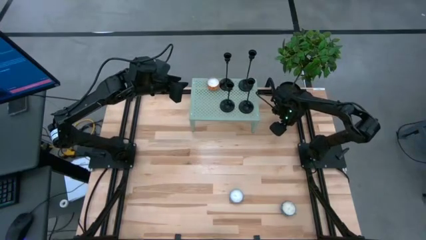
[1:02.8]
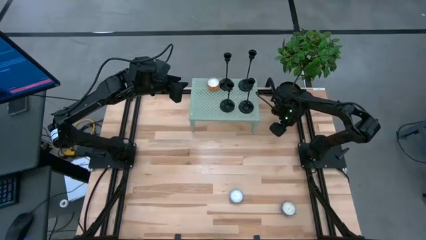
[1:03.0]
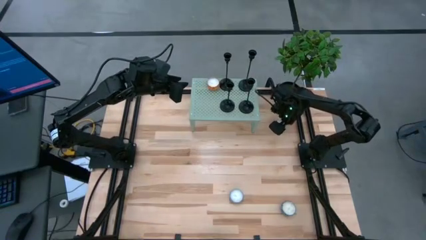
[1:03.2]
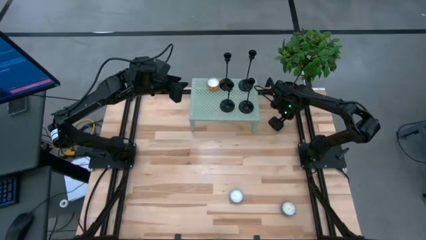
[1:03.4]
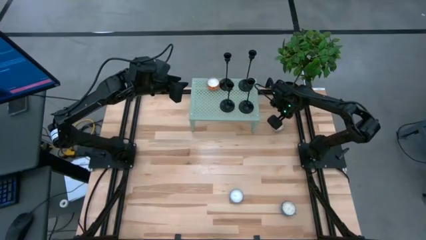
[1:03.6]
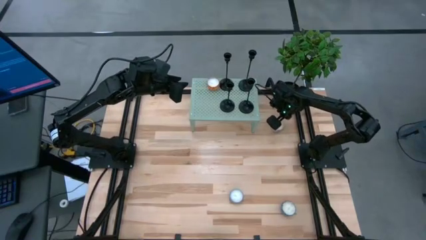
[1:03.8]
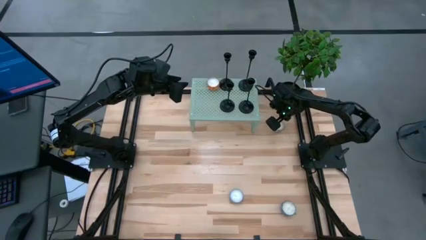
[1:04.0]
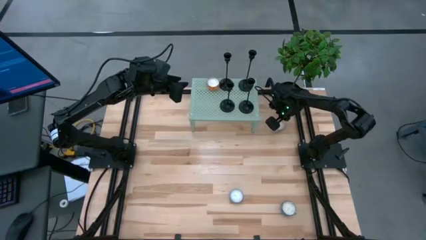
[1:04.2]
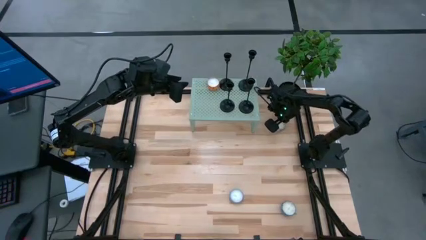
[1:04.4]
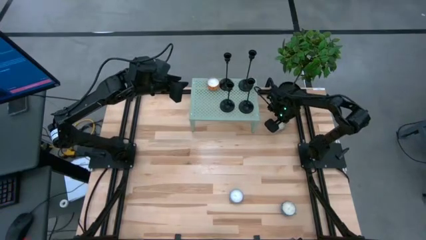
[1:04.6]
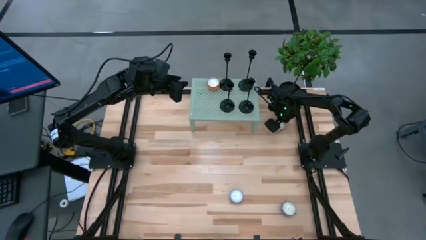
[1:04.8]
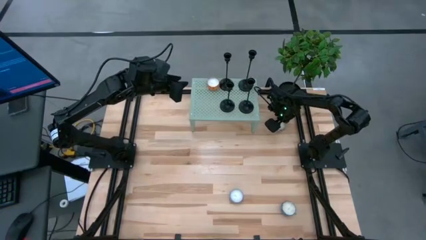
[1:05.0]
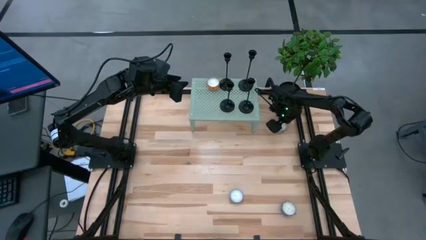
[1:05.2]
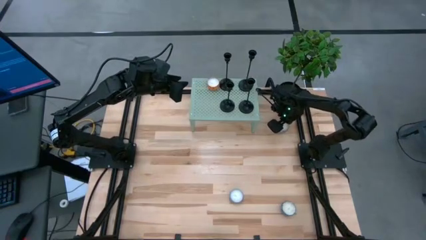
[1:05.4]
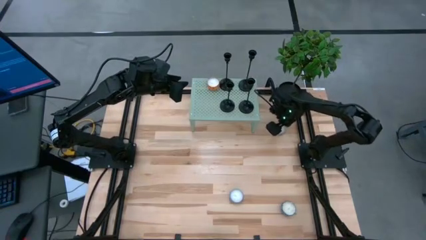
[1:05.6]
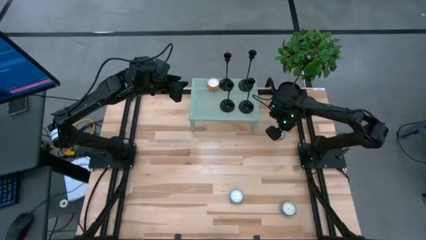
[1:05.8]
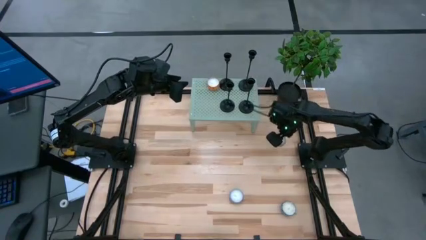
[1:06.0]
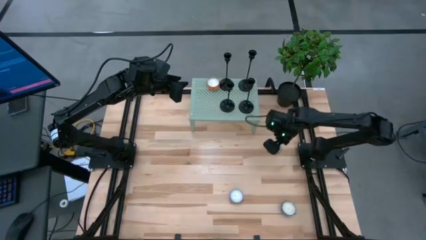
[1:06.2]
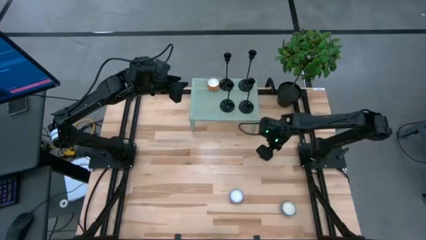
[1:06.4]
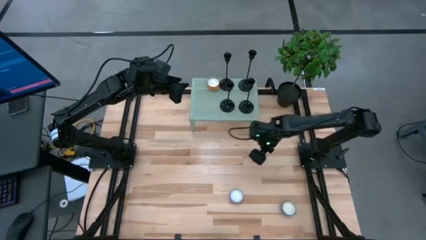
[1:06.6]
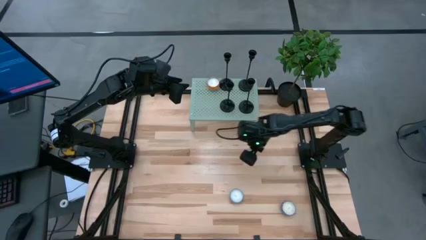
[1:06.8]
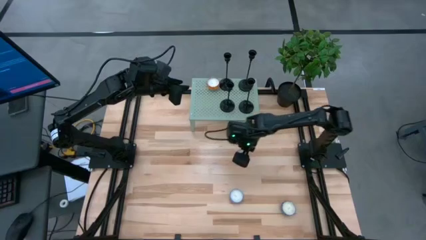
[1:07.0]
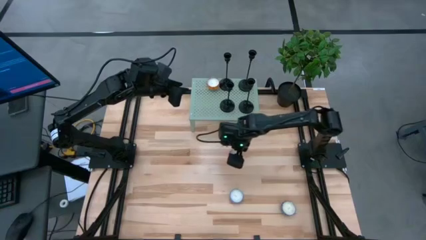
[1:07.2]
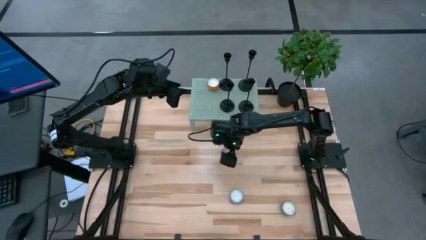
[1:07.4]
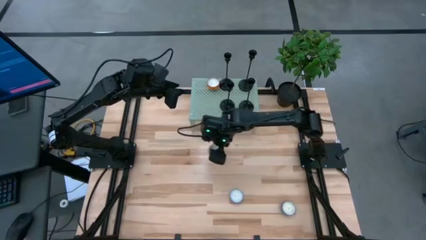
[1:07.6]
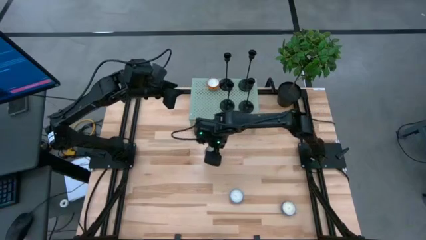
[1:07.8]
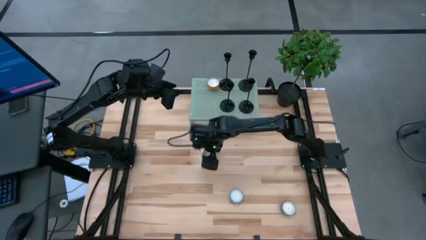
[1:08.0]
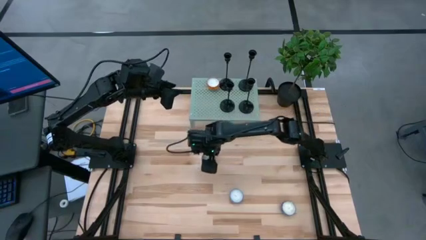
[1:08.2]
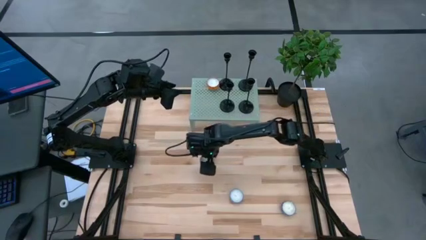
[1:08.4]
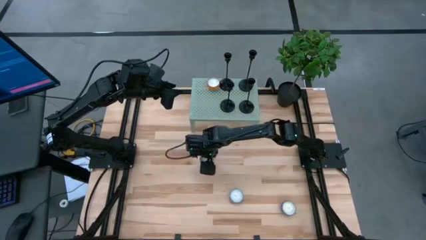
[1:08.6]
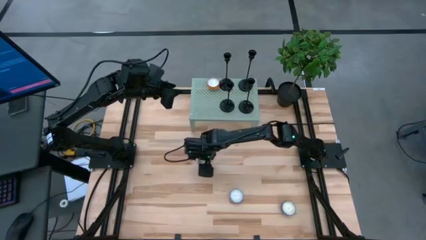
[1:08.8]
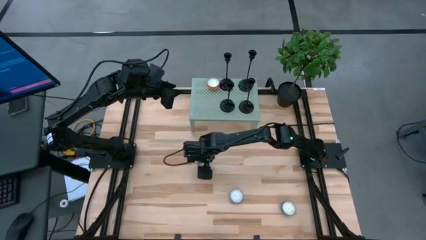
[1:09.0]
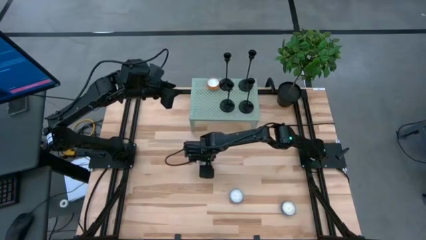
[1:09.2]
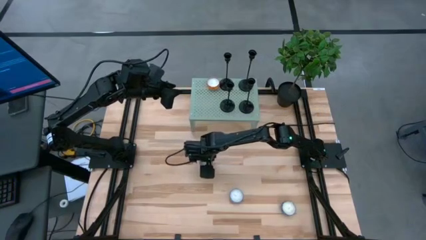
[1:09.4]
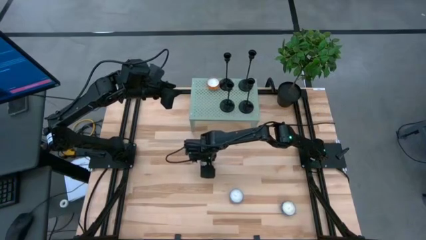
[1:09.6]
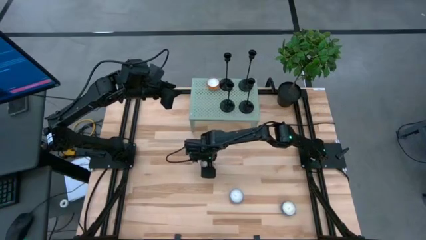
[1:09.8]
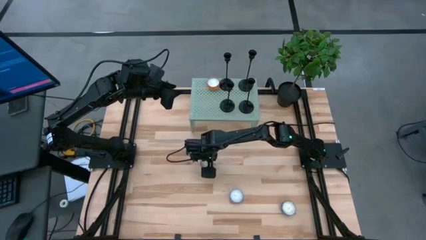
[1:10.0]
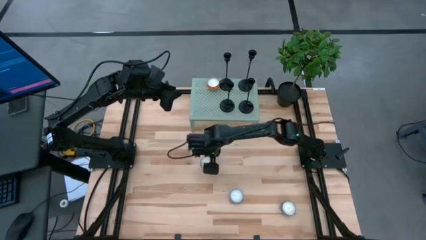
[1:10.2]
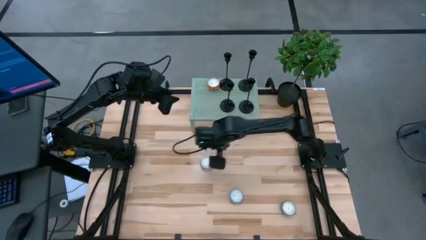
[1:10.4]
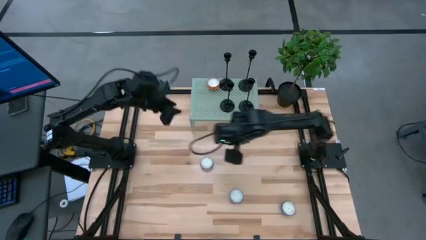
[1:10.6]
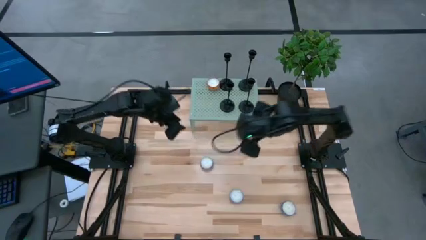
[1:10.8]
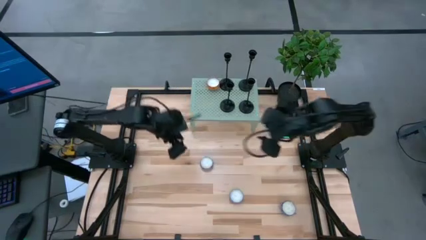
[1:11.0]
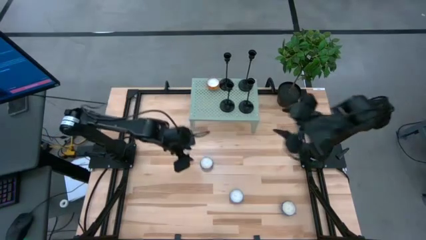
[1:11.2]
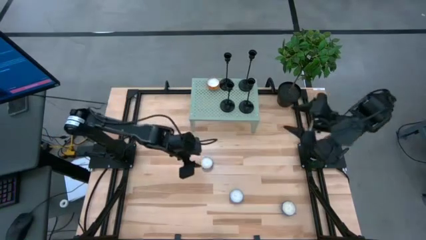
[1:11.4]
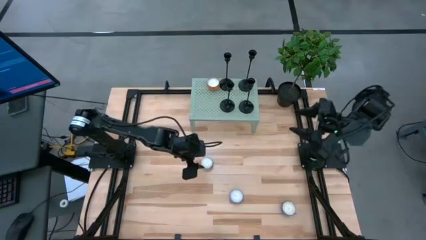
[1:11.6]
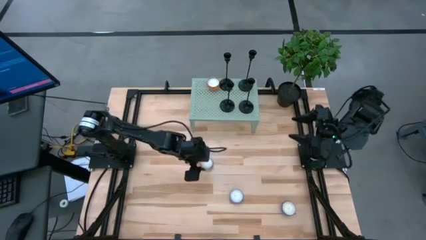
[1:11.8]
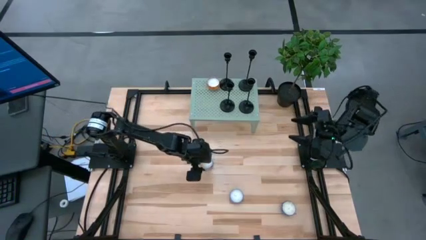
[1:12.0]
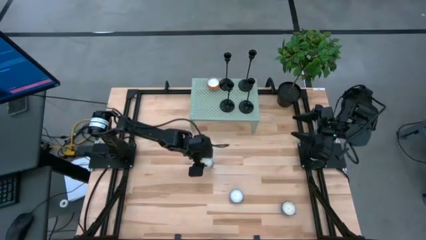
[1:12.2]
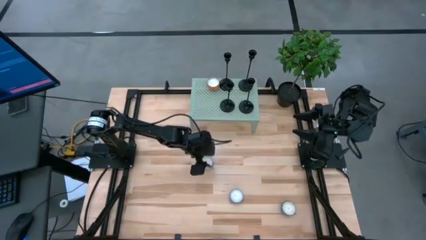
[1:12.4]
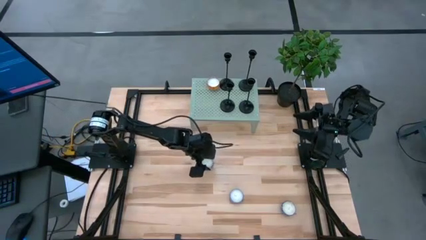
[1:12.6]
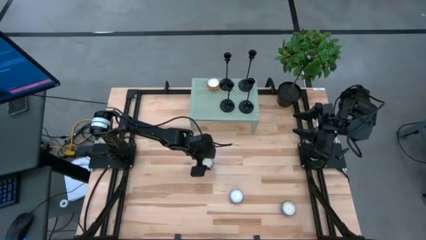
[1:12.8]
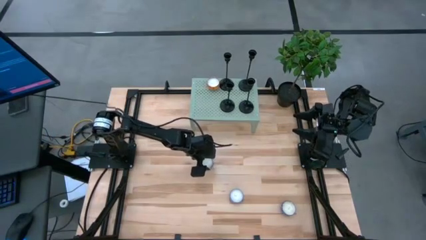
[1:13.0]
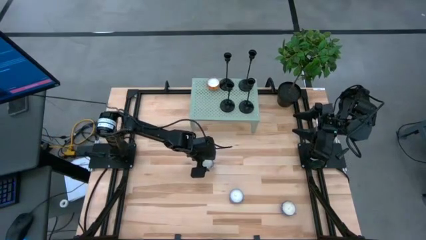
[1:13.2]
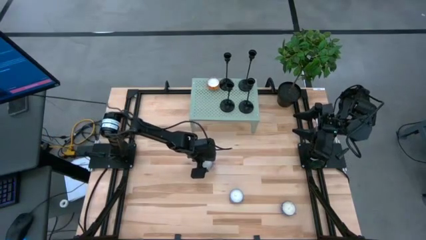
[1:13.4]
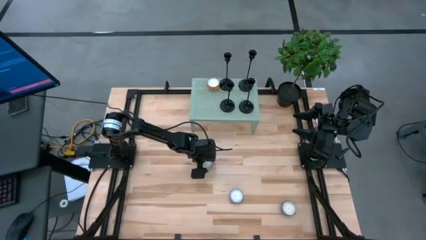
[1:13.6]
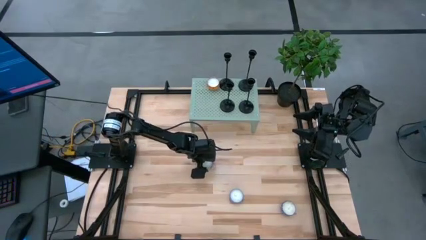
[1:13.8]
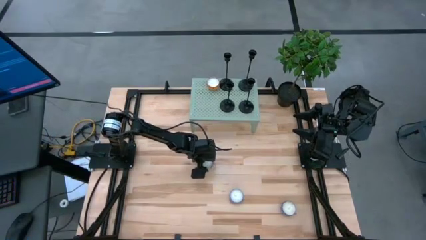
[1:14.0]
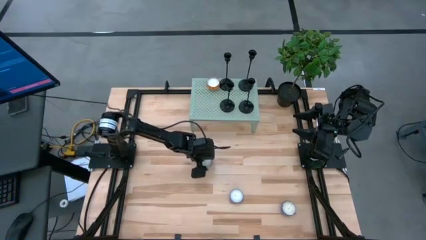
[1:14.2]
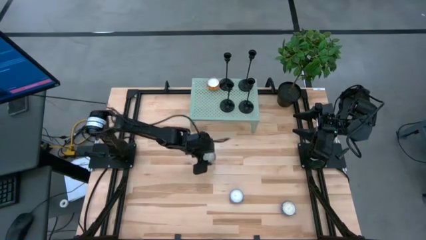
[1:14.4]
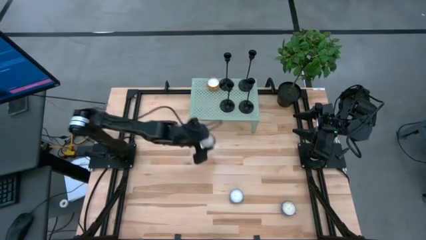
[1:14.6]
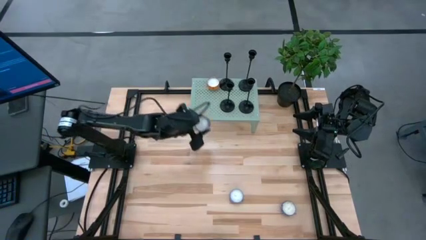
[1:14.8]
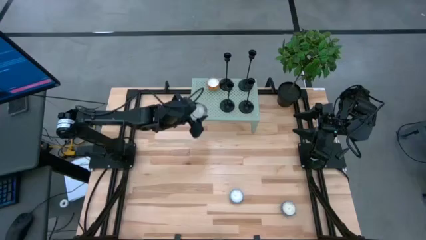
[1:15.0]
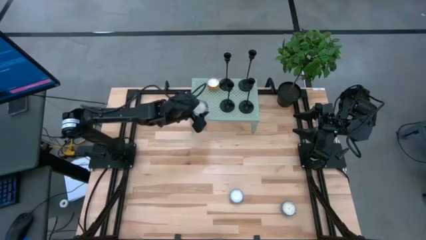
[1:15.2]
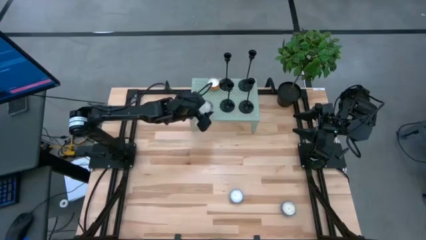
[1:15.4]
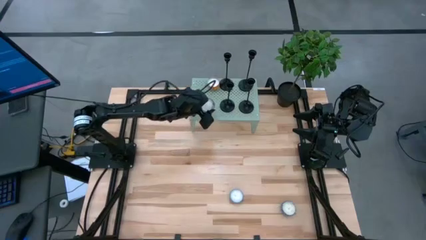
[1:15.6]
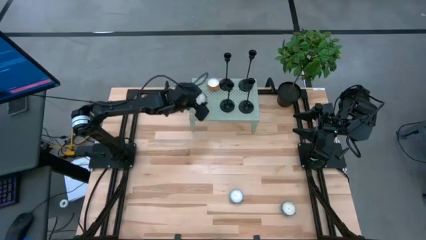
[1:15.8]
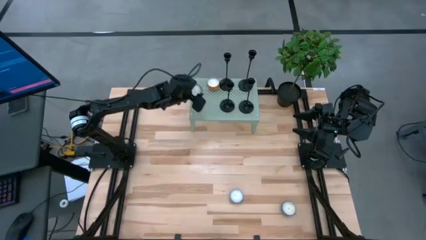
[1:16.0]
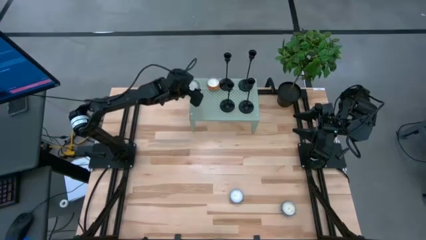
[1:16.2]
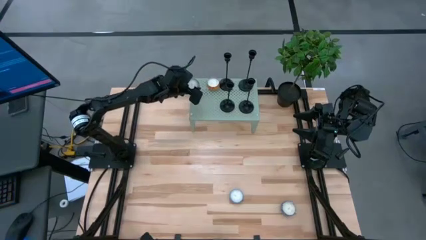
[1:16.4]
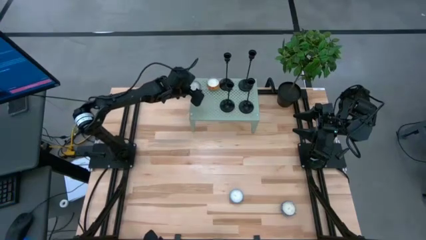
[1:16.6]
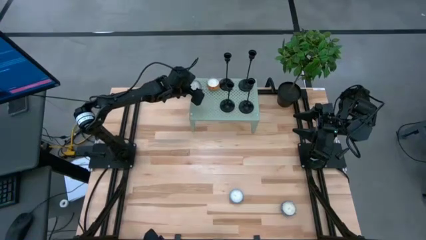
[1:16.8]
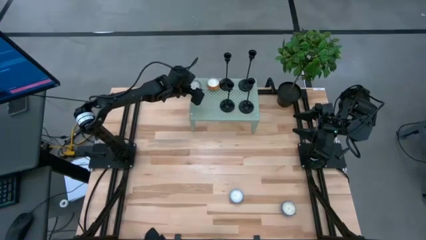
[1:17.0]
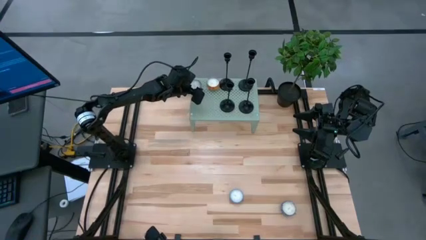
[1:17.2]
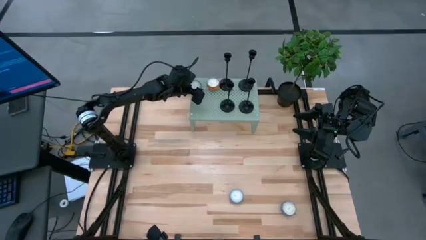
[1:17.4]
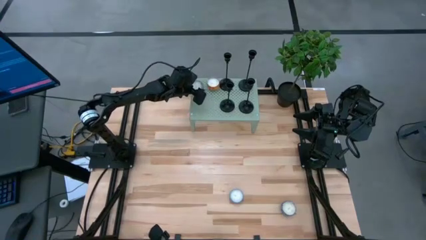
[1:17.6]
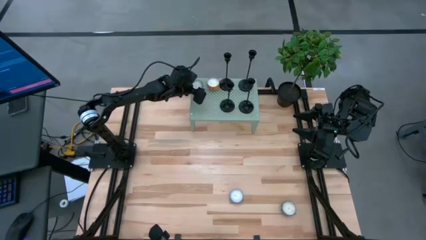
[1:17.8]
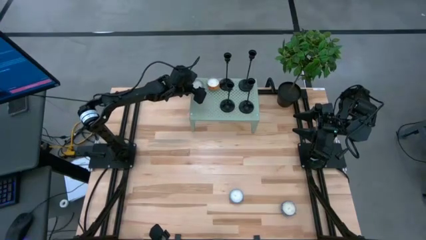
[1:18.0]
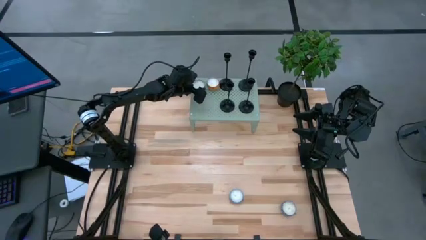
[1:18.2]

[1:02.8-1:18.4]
Task: Pick & Place candle stick holders
Put the red scented candle on the shelf

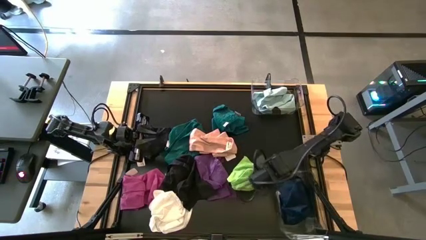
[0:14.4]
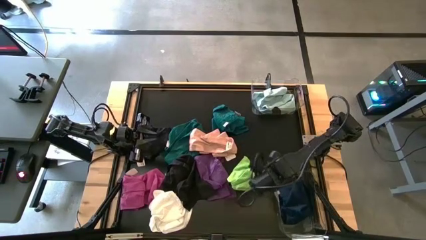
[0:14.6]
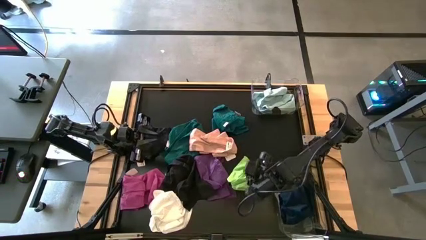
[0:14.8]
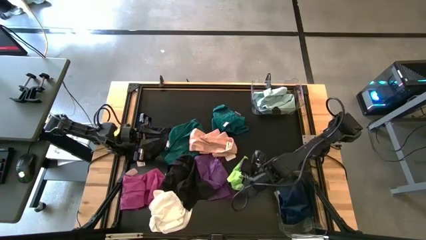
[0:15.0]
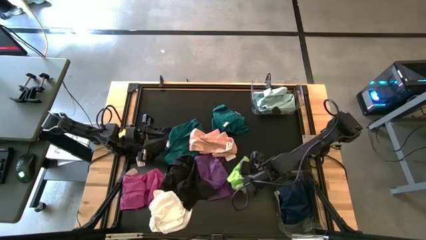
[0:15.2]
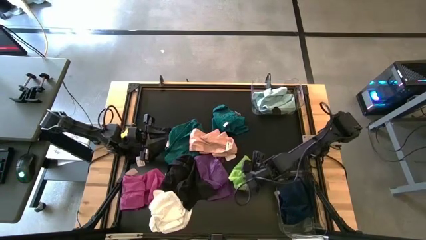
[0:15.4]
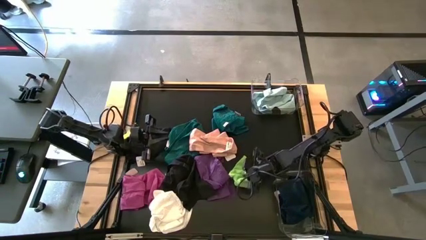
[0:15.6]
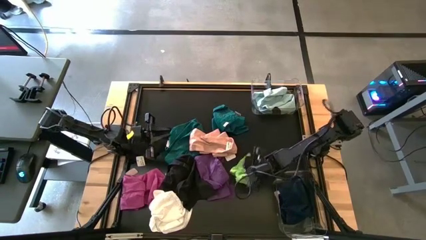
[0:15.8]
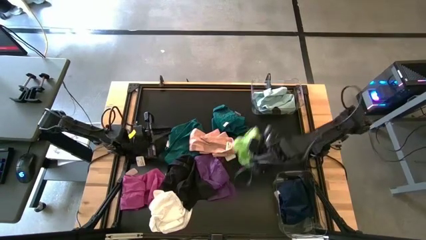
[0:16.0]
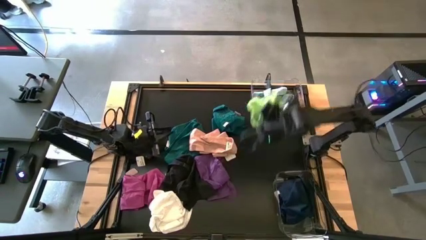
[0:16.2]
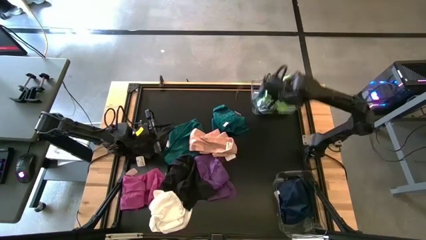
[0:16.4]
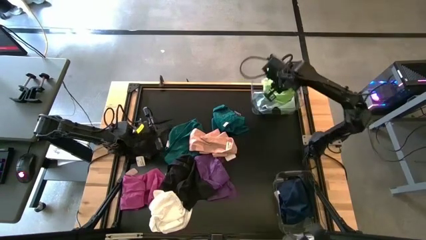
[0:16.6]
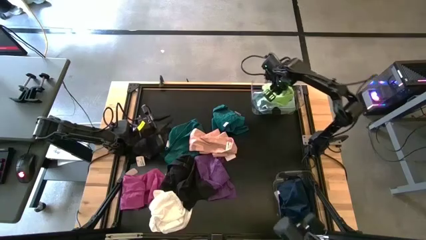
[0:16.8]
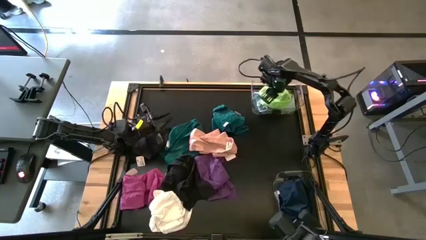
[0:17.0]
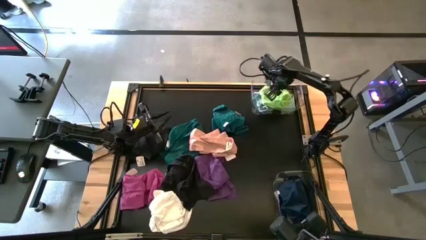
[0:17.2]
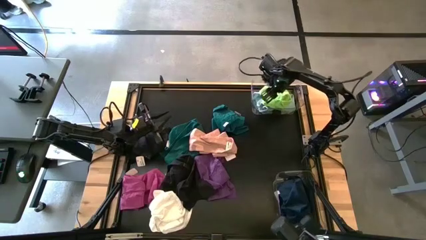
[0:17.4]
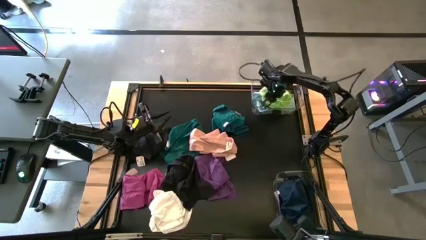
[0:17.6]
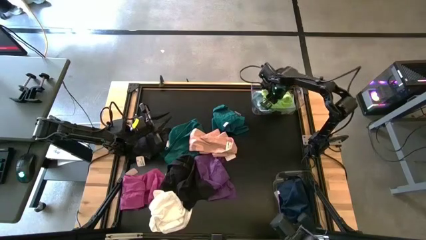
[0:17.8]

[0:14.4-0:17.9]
Task: Sort towels by color in basket
Put the green towel into the top transparent bin
